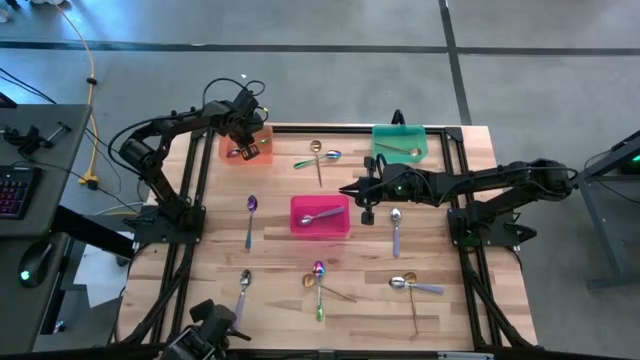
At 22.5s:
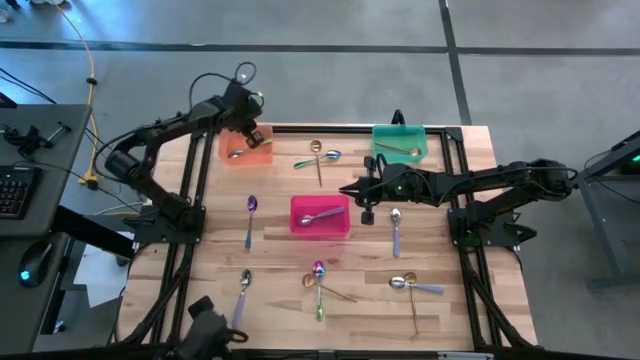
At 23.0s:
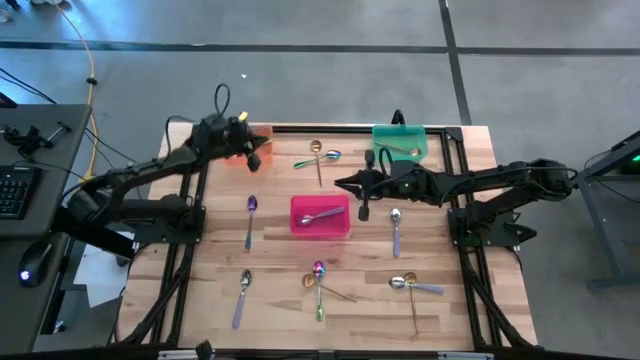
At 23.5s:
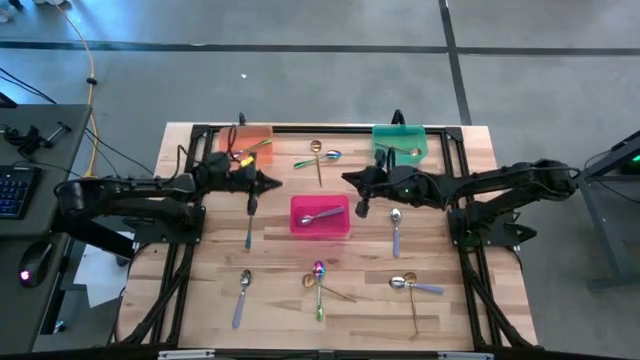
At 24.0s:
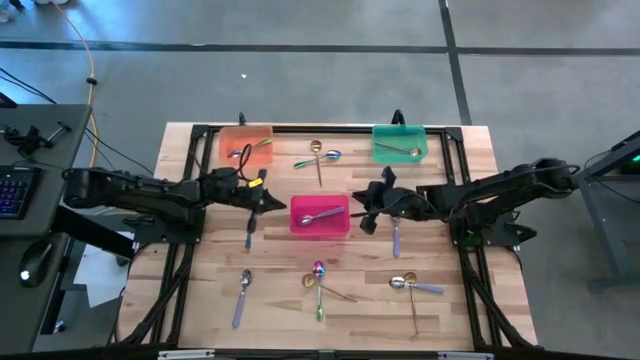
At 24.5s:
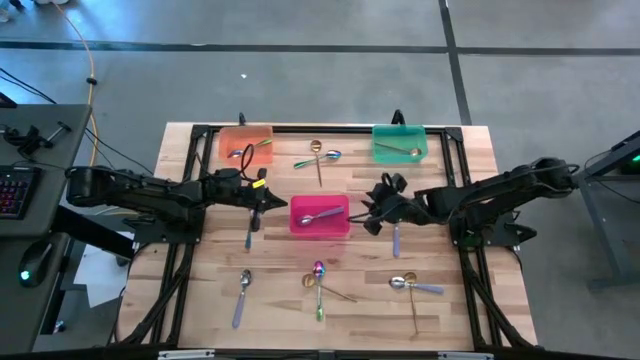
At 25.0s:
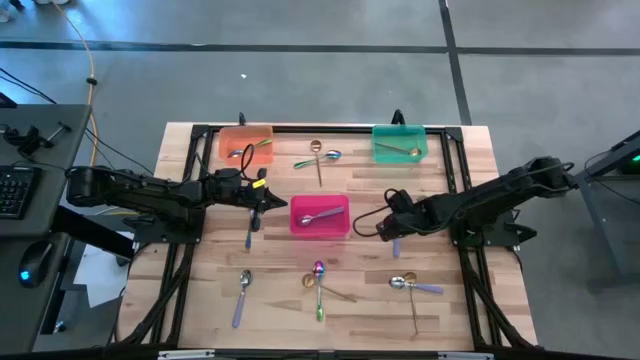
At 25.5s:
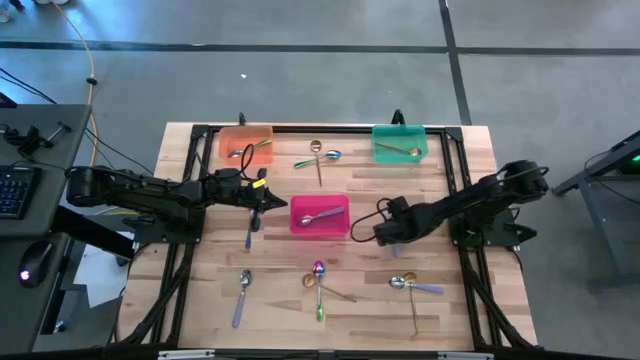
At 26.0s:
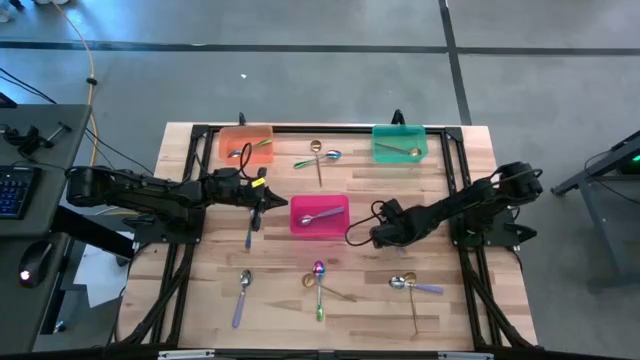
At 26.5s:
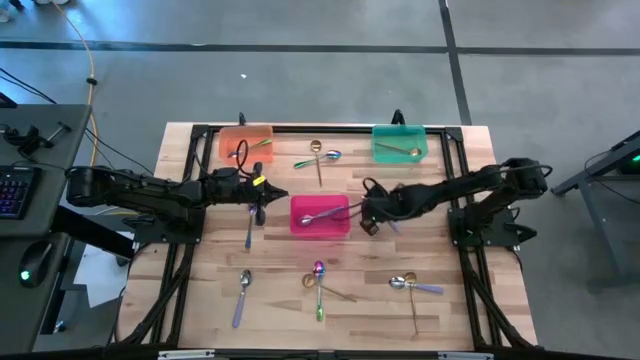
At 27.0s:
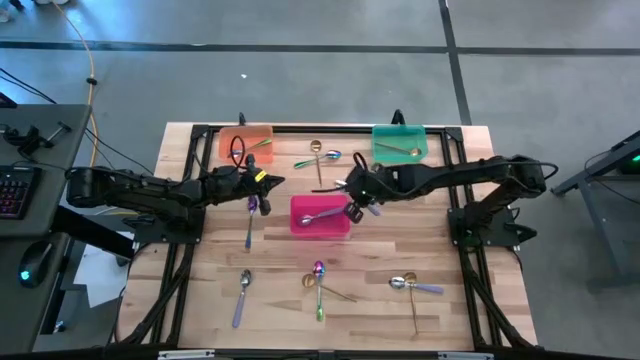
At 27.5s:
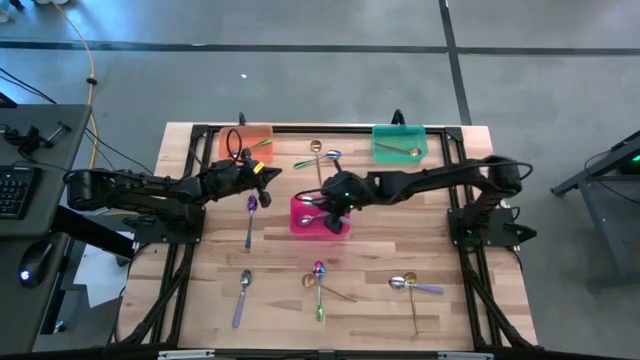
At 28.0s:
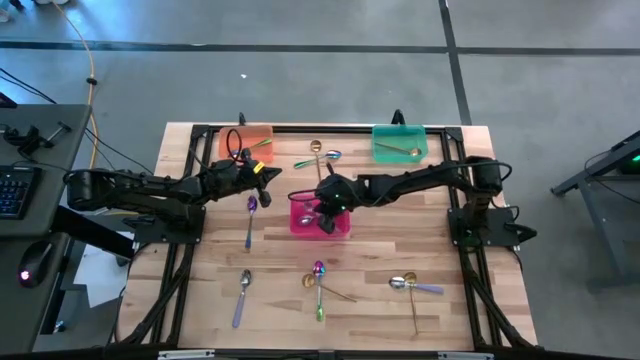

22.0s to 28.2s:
Task: Sort silverware by color (type)
Put the purple spoon into the red bin

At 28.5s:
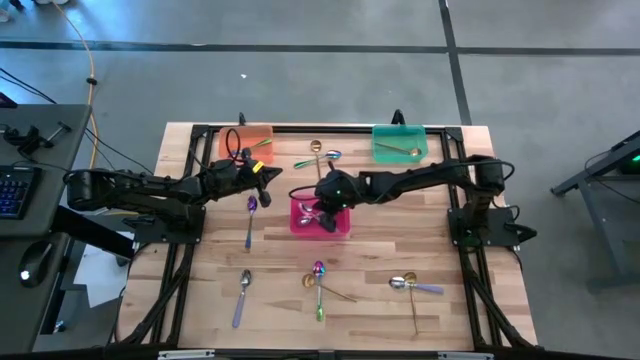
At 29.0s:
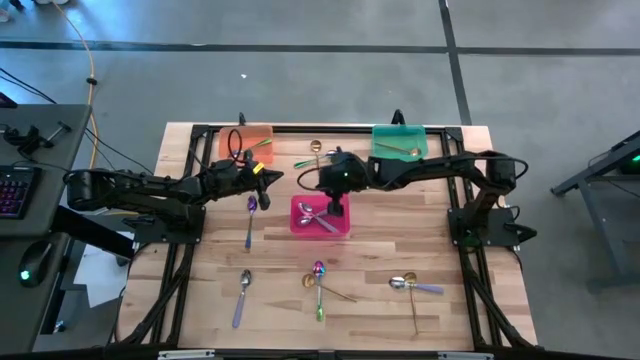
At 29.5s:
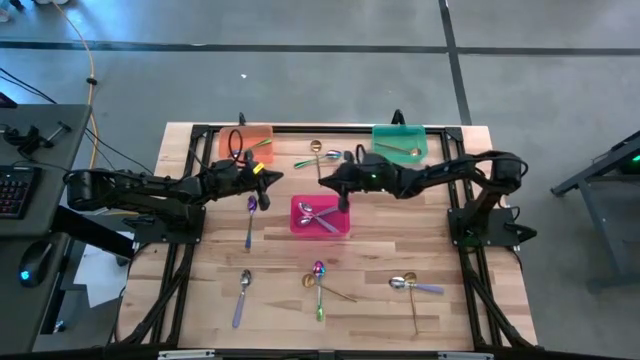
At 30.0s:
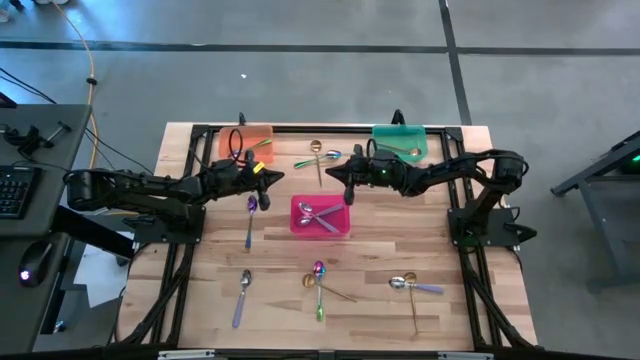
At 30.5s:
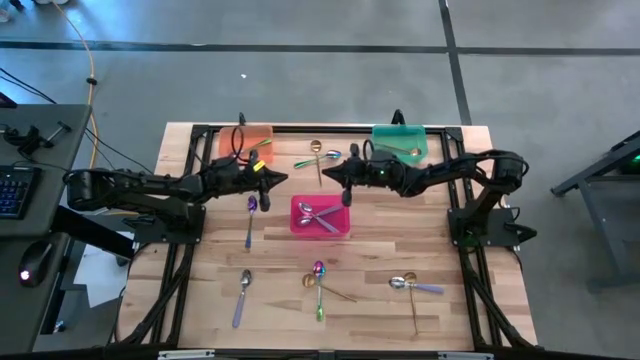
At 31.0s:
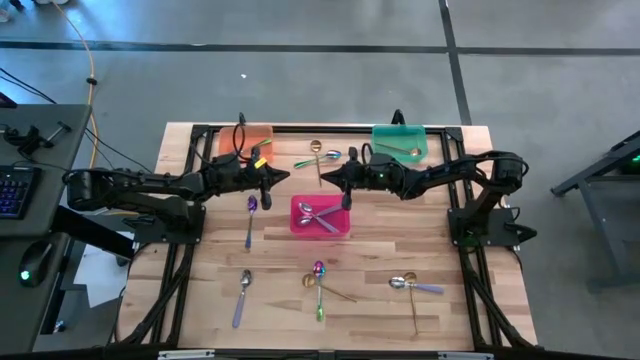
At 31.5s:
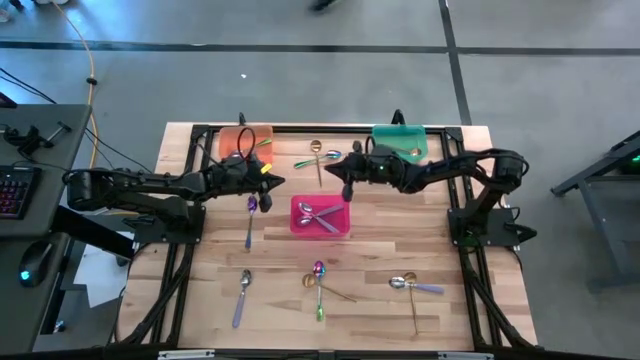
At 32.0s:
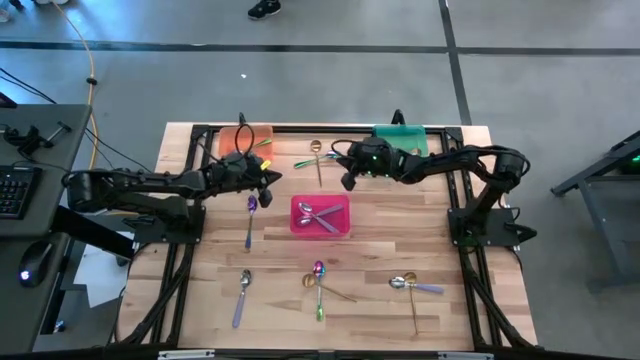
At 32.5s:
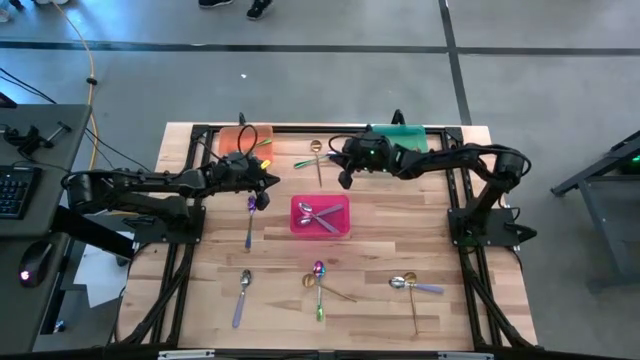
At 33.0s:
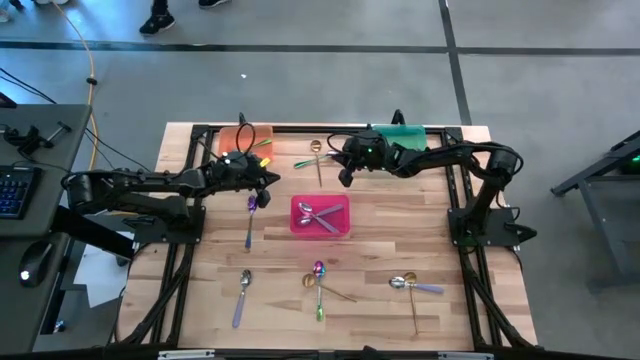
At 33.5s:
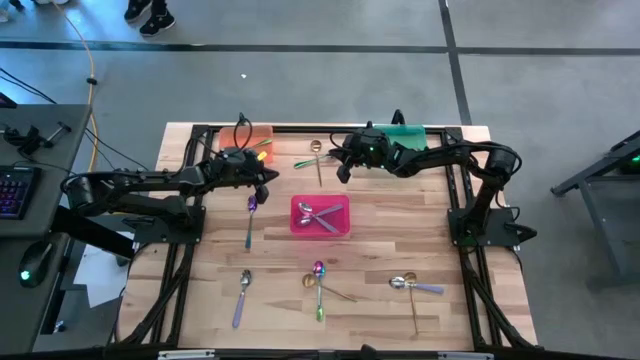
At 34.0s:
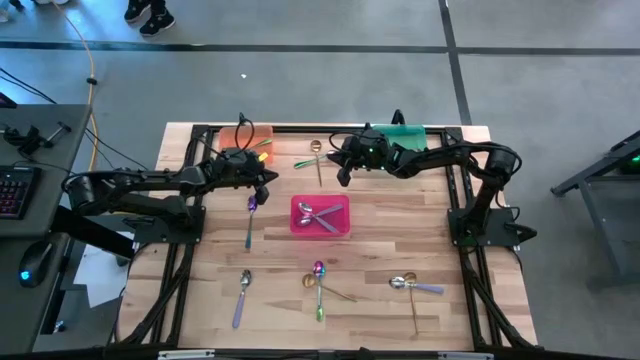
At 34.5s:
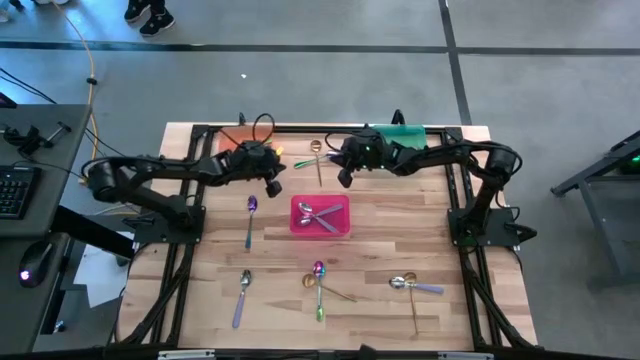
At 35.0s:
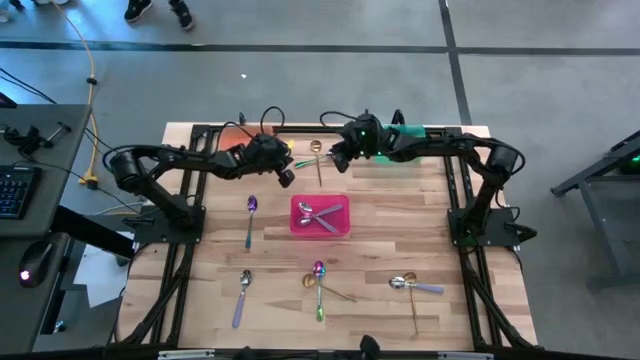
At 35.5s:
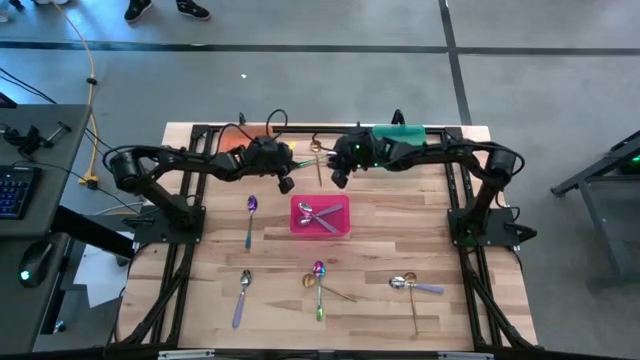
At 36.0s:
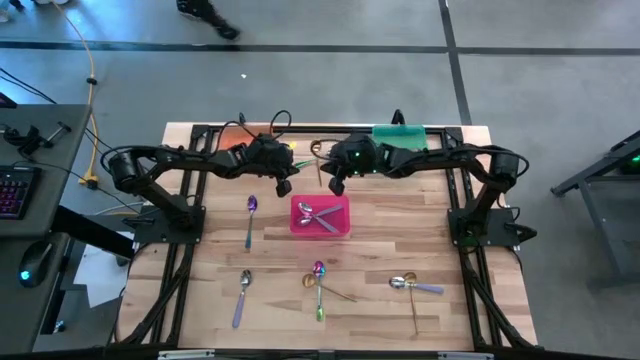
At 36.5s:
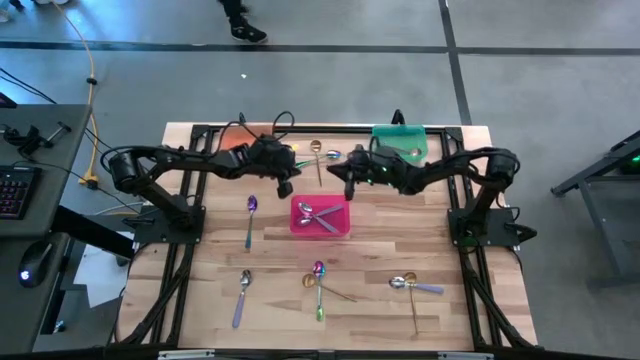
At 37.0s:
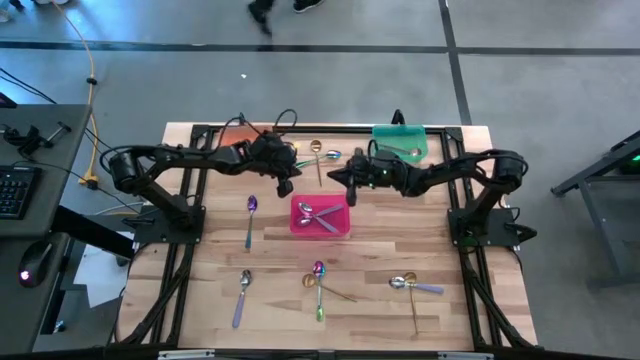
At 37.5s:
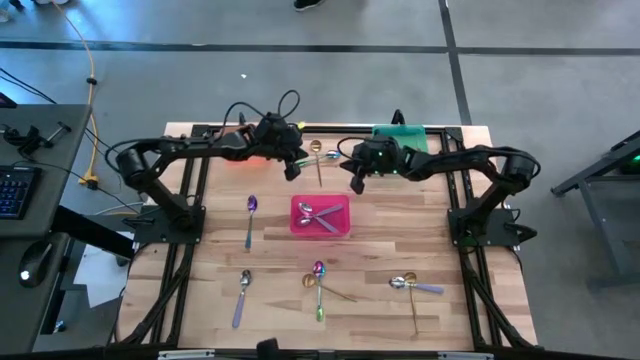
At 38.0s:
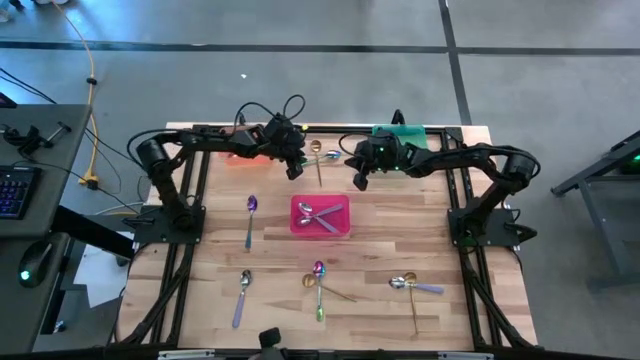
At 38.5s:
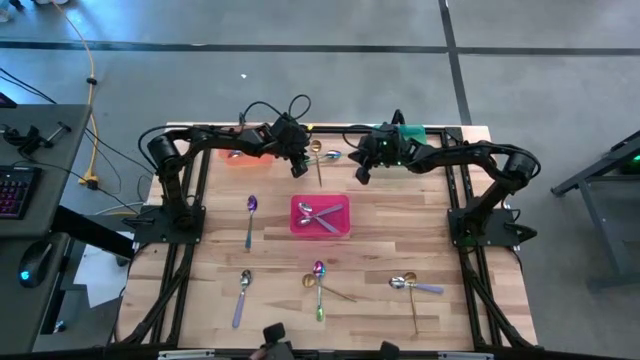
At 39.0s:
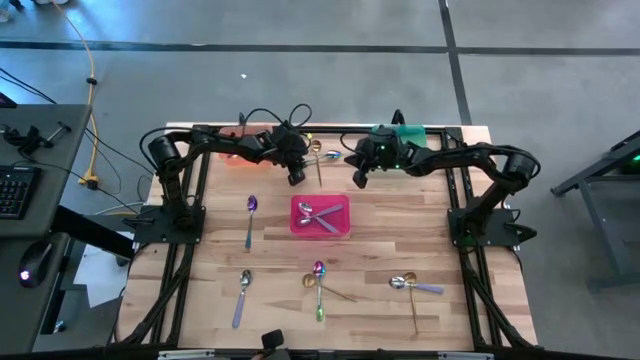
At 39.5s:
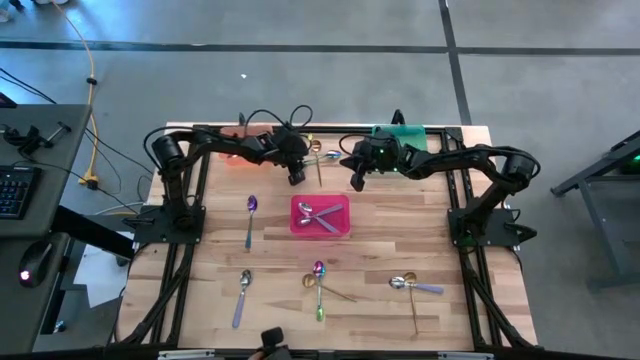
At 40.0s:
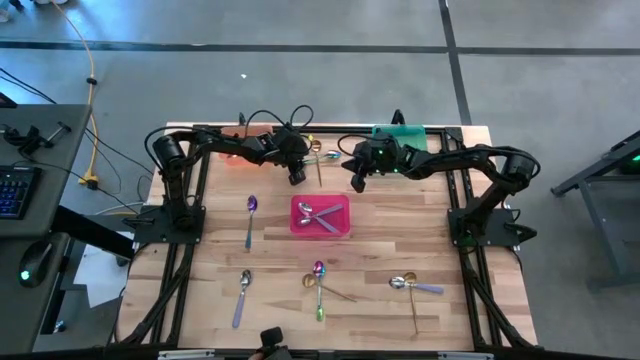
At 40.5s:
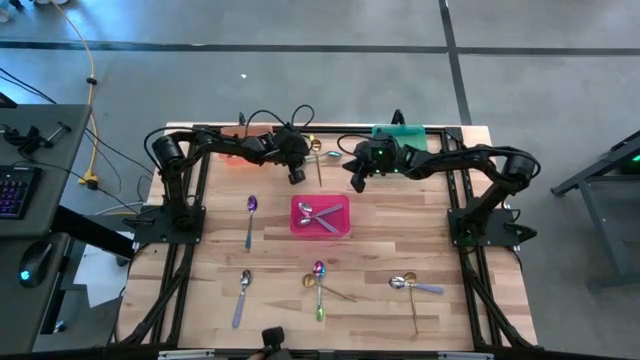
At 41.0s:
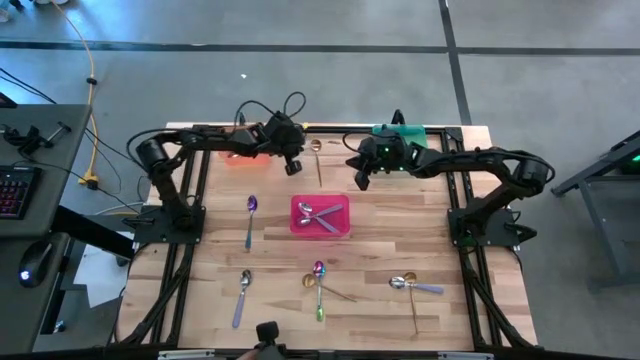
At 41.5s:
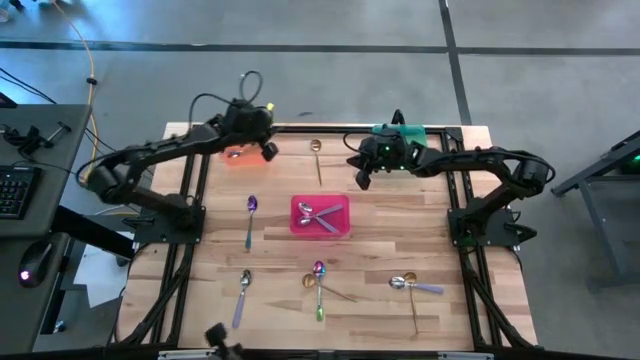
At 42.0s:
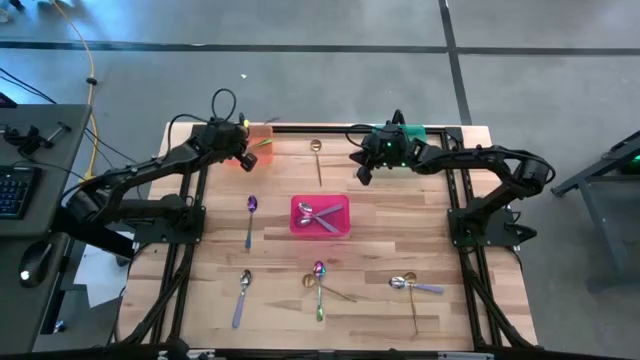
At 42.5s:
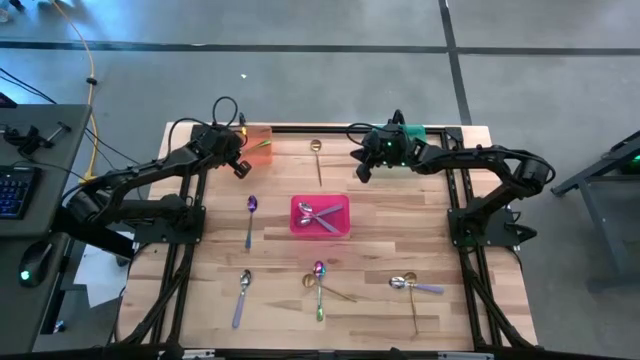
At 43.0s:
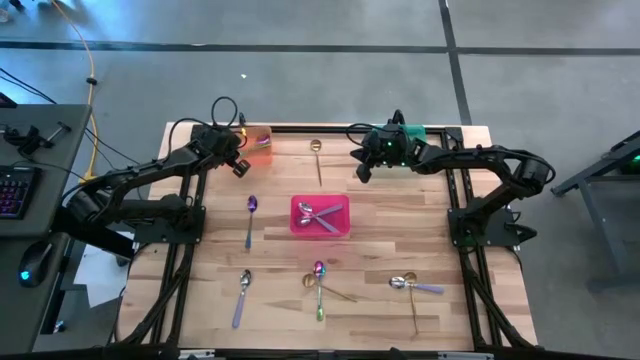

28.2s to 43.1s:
Put the green spoon into the orange bin
